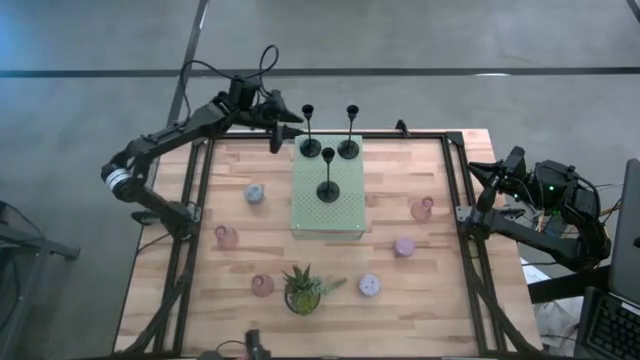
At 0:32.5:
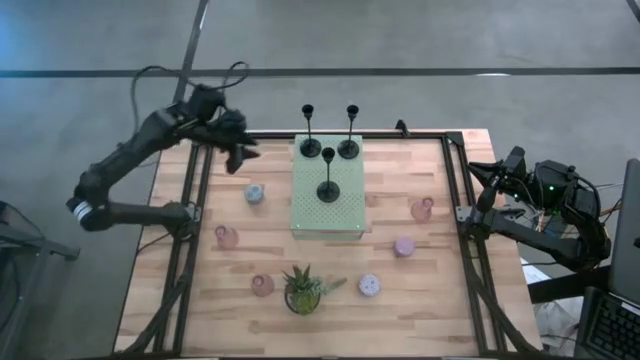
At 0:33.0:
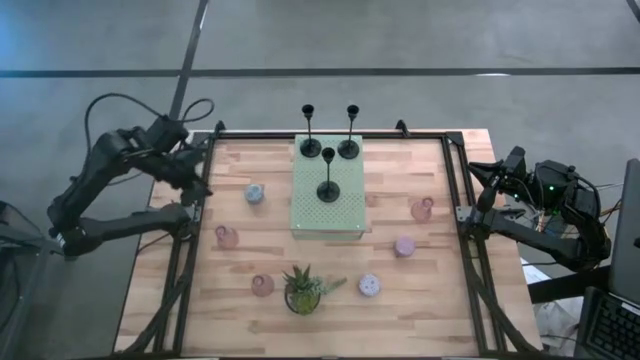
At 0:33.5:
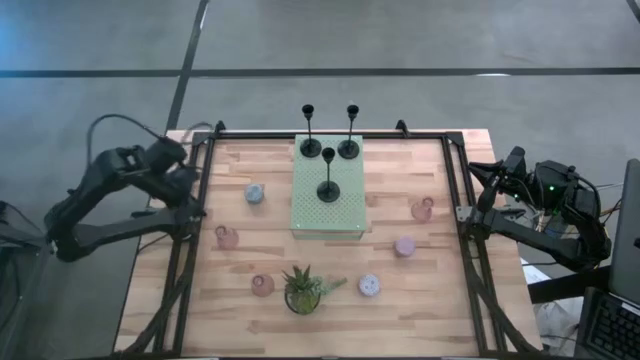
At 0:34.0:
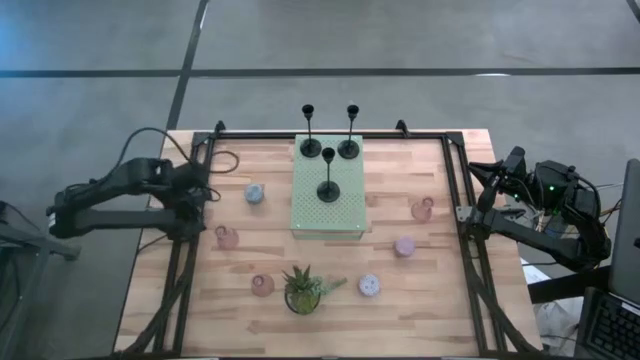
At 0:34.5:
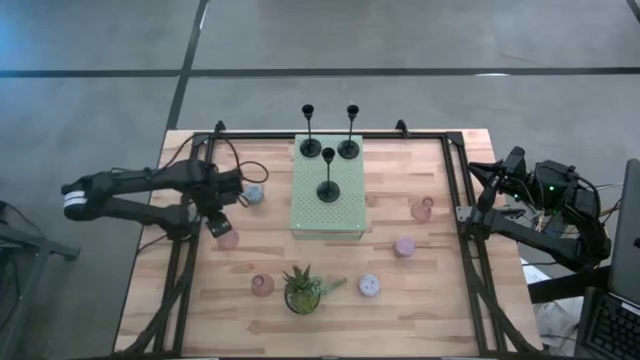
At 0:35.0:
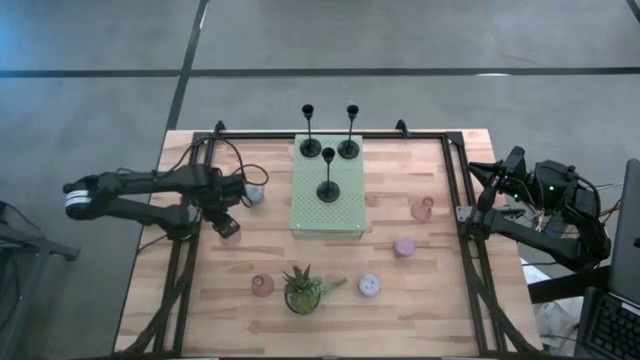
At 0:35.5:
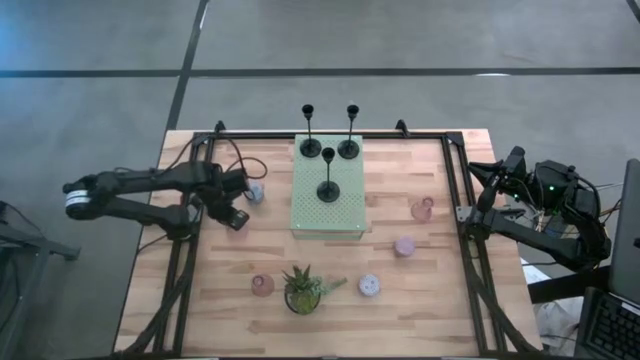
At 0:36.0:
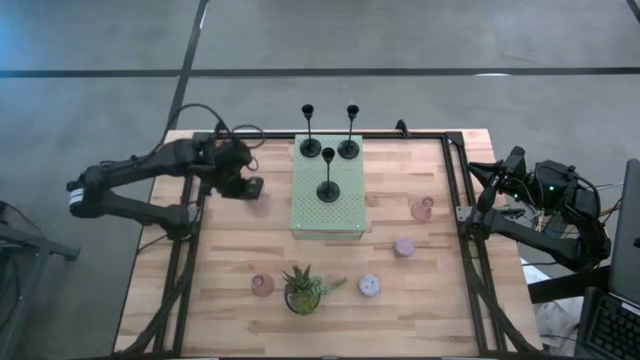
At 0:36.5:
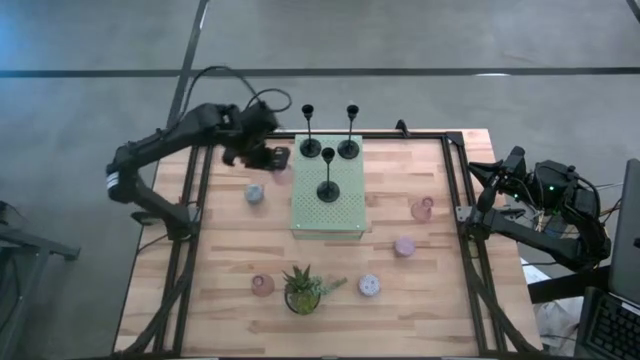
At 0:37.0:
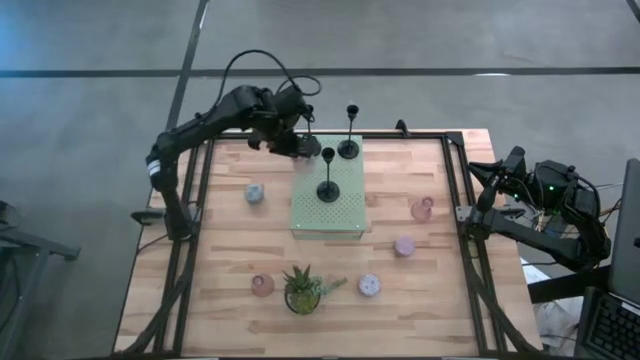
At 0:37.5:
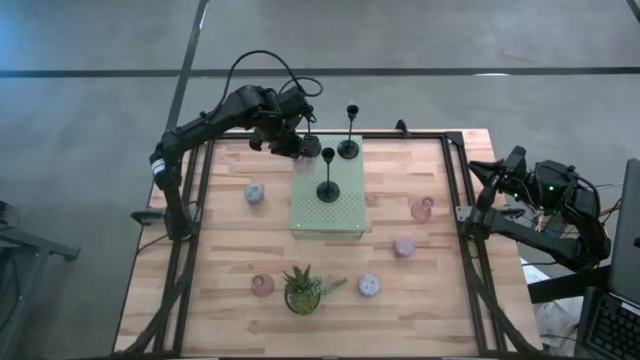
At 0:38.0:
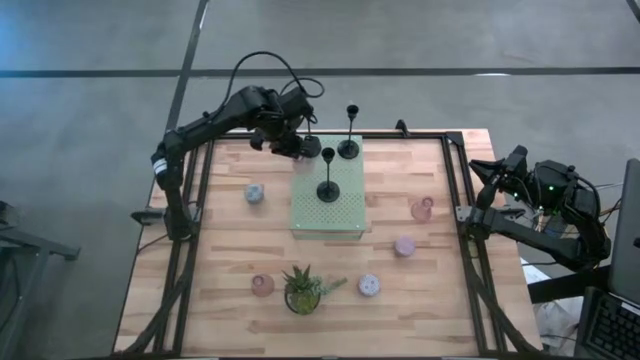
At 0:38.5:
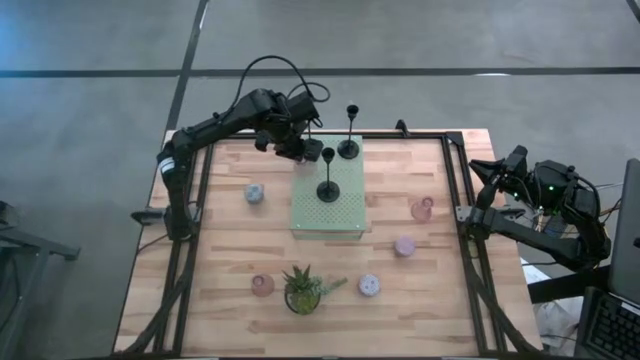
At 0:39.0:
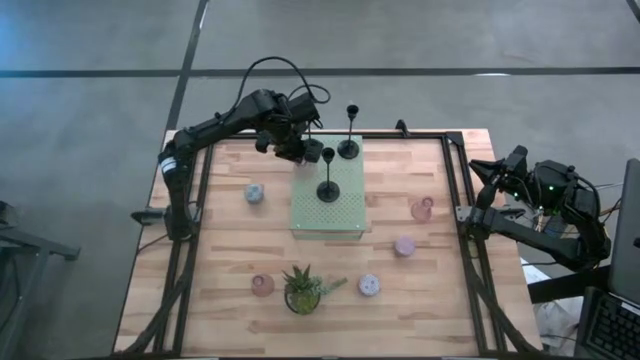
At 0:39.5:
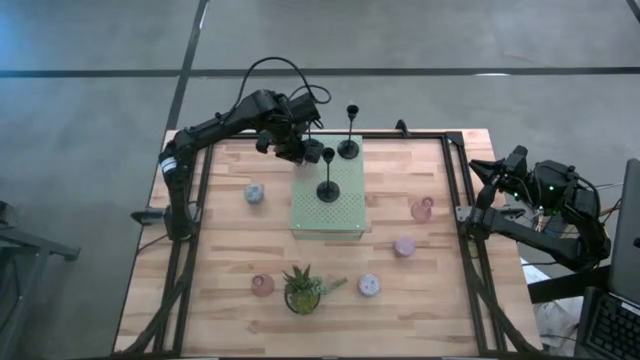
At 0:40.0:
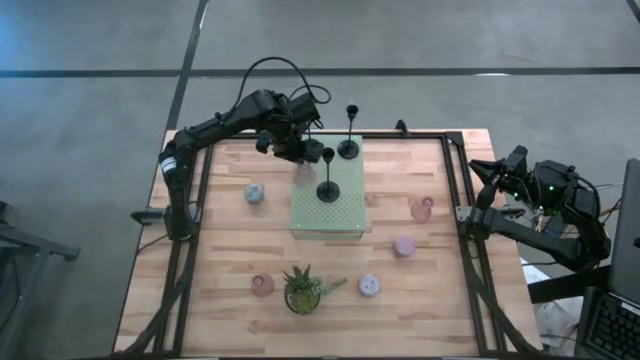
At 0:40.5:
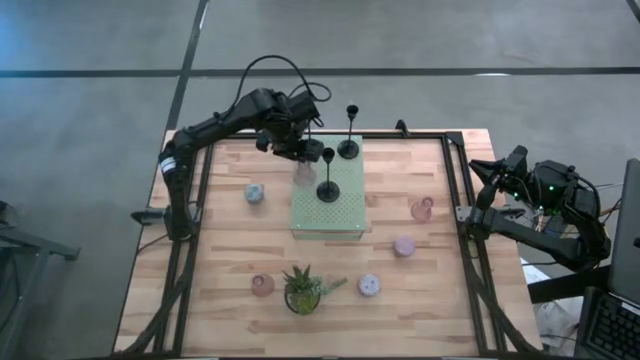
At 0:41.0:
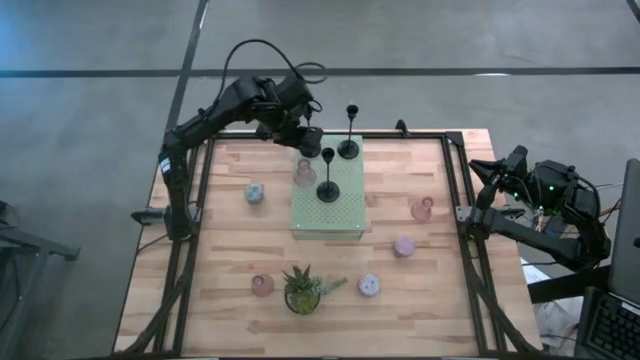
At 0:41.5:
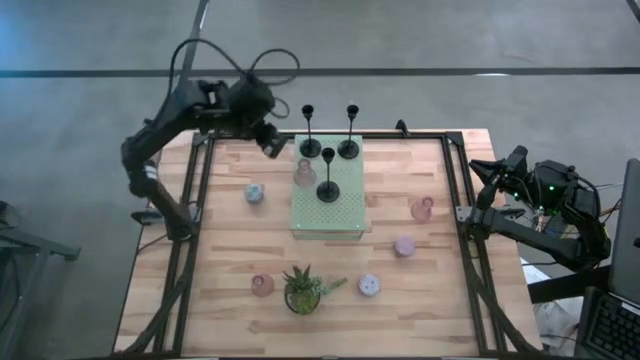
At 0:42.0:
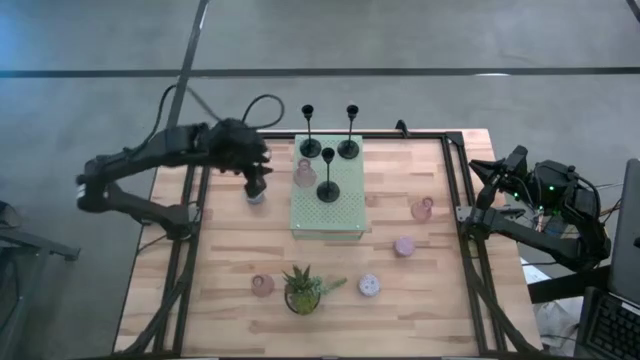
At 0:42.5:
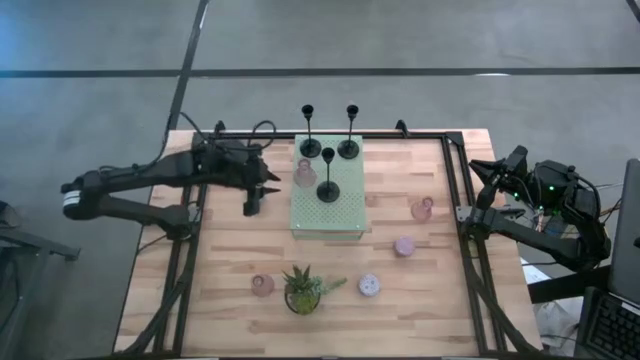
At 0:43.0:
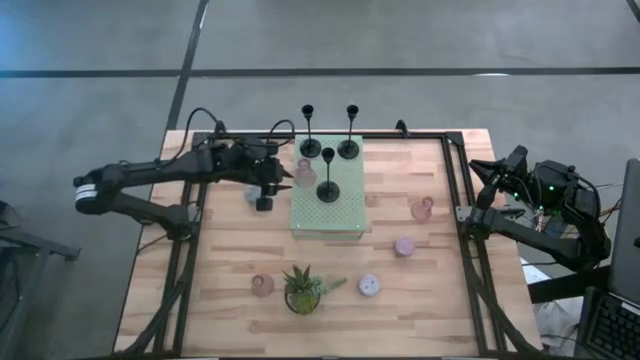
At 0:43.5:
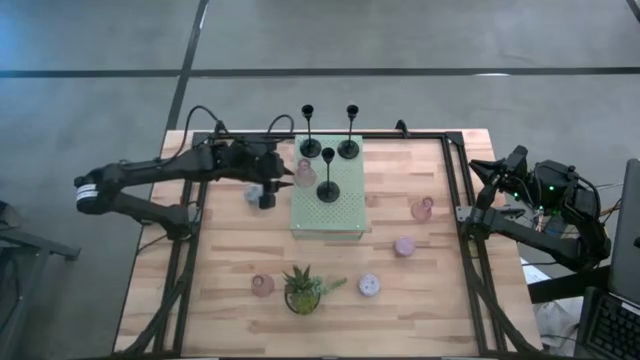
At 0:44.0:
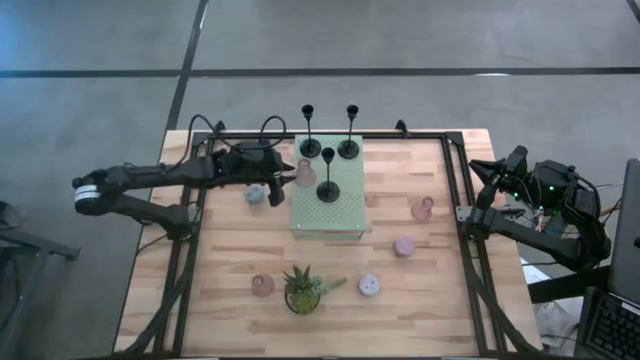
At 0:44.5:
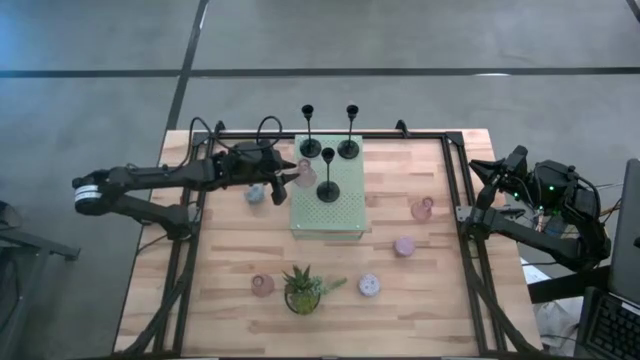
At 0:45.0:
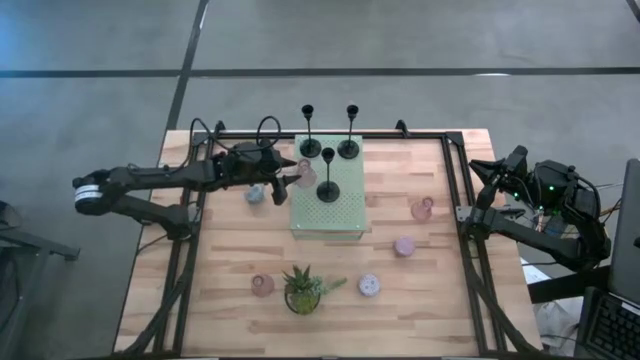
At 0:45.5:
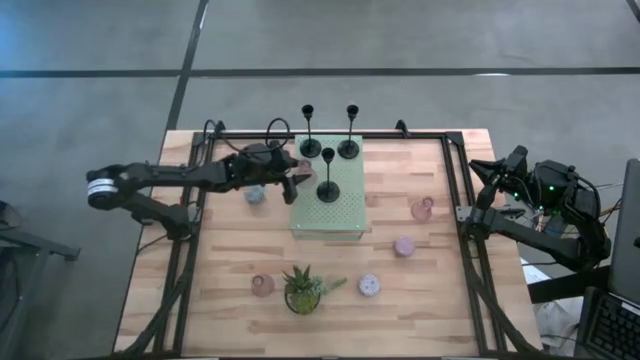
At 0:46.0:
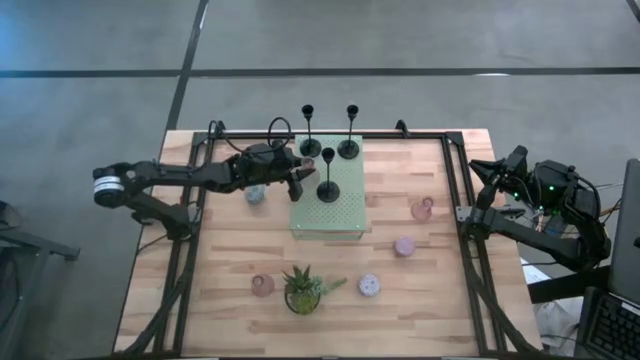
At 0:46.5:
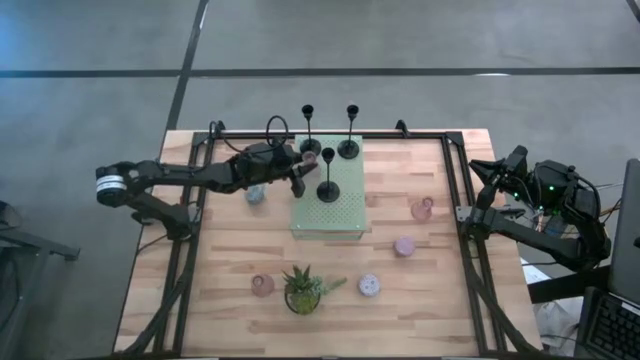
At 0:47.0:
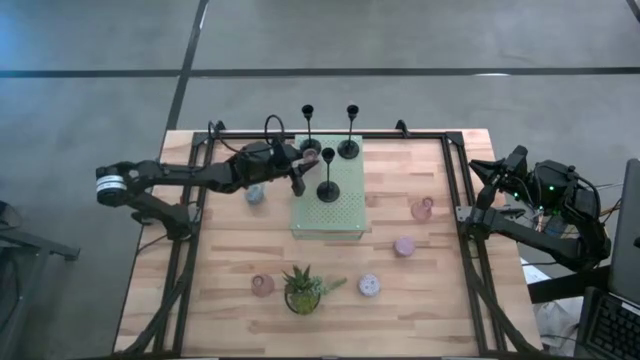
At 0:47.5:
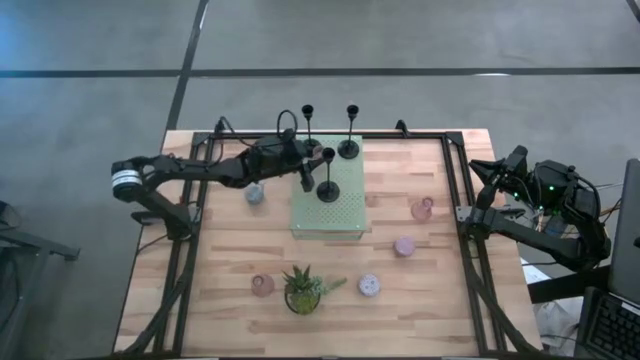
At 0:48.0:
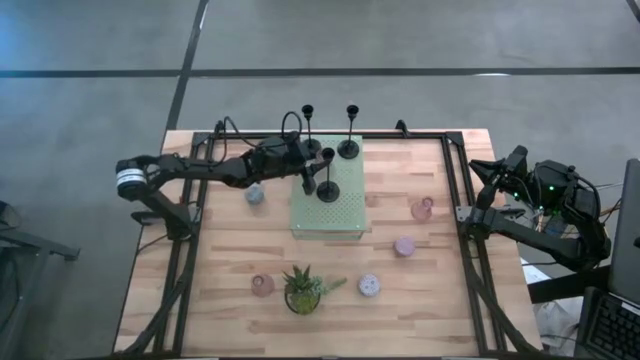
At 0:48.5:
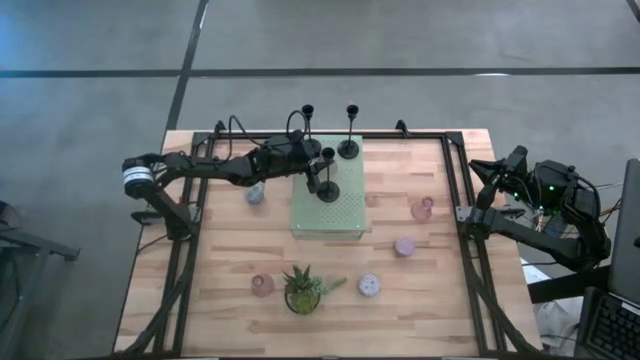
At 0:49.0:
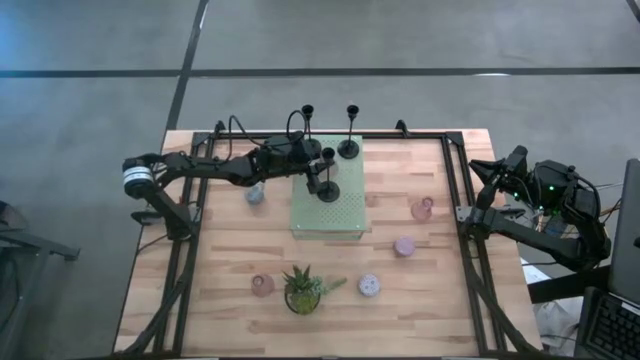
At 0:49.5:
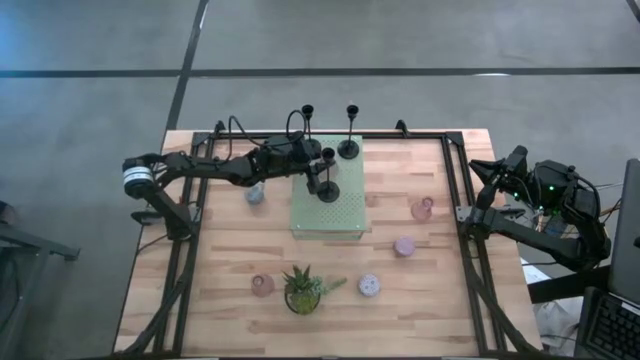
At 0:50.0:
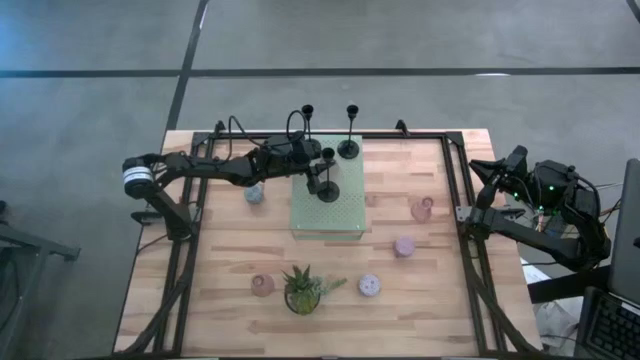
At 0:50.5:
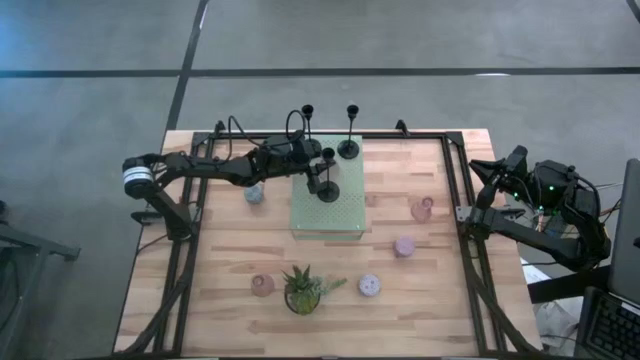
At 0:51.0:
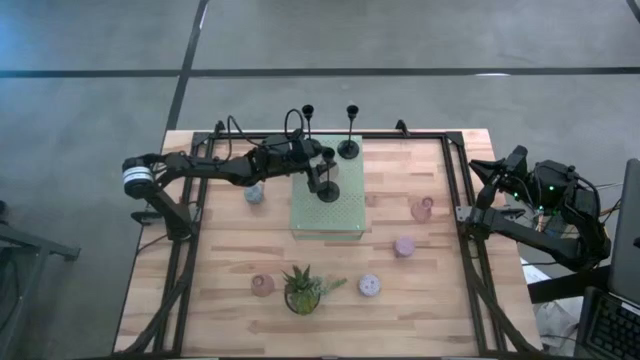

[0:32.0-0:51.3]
Task: Pick & Place candle stick holders
Put the top pink glass candle holder on the shelf

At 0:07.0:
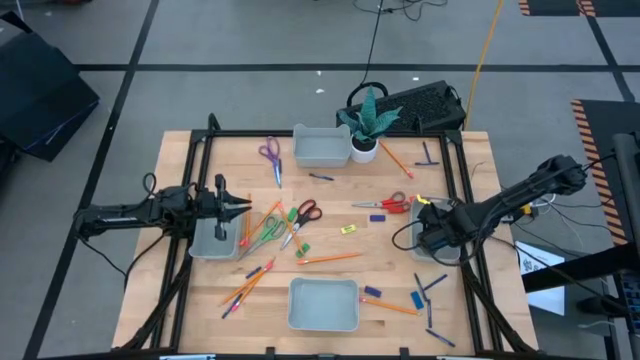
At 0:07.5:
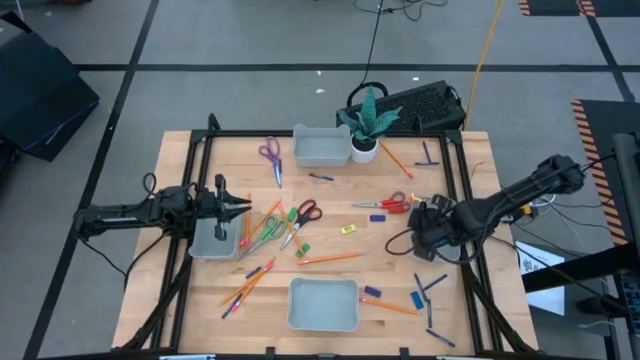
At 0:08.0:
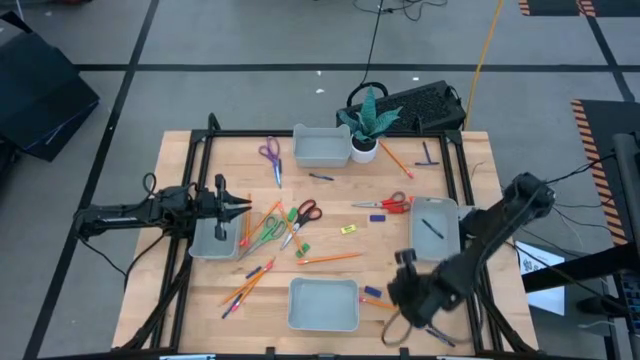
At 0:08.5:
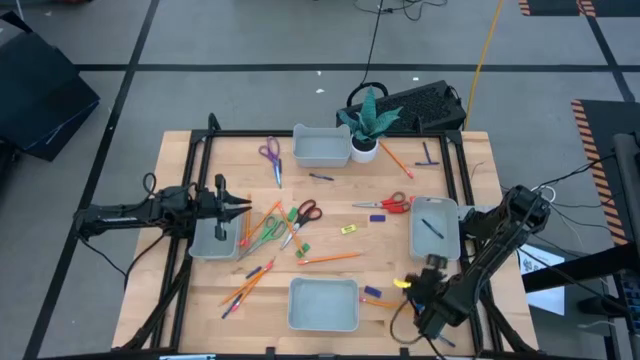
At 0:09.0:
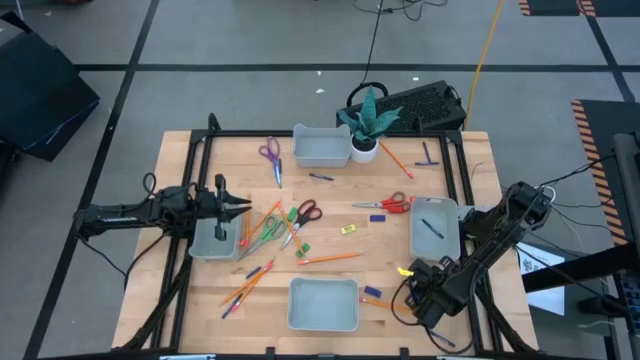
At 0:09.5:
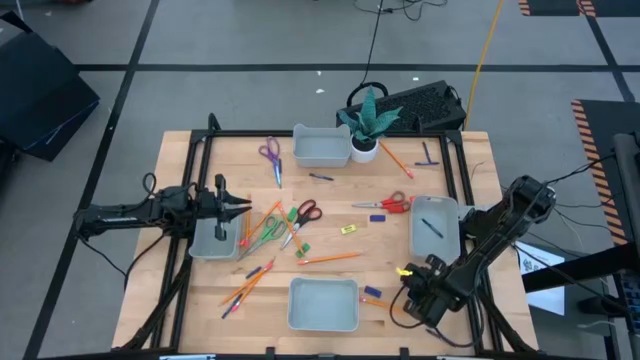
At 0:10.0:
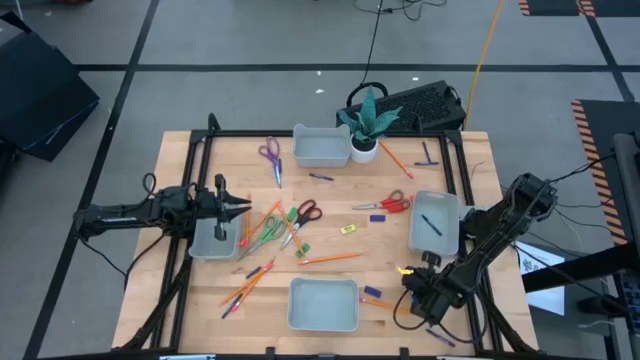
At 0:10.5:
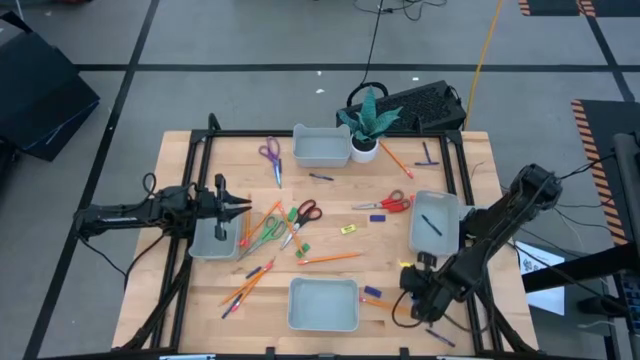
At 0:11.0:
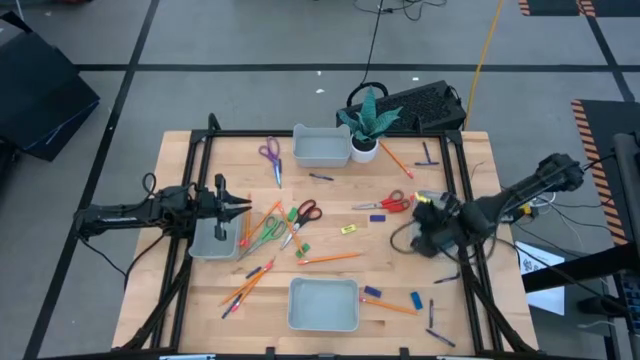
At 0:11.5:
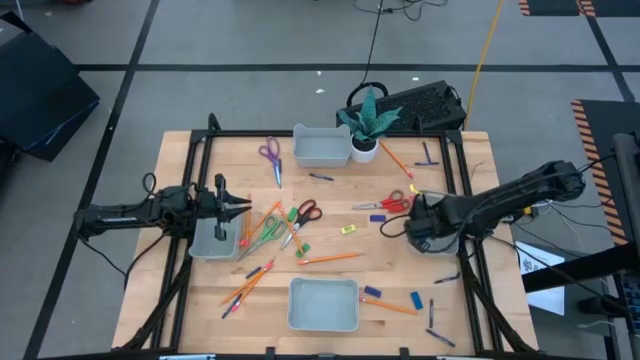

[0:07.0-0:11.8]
Task: Sort crayons/erasers/pens/pencils in bins
Put the blue crayon into the middle right gray bin
